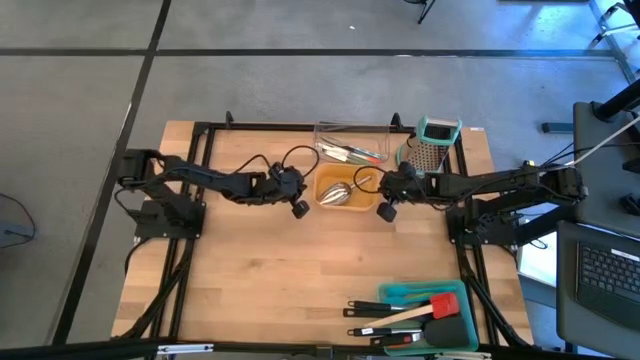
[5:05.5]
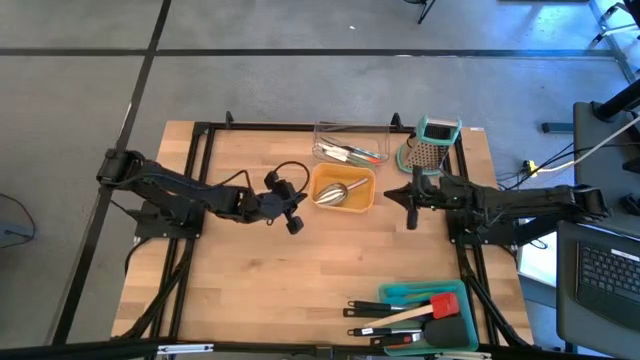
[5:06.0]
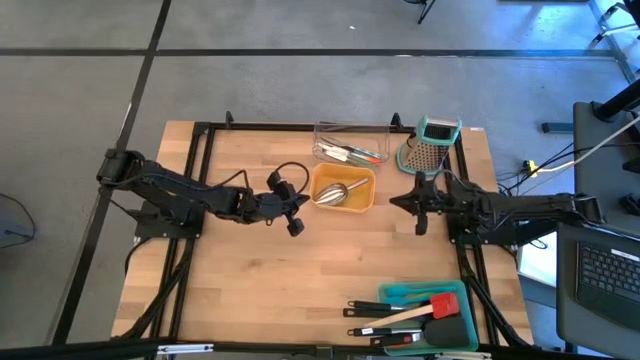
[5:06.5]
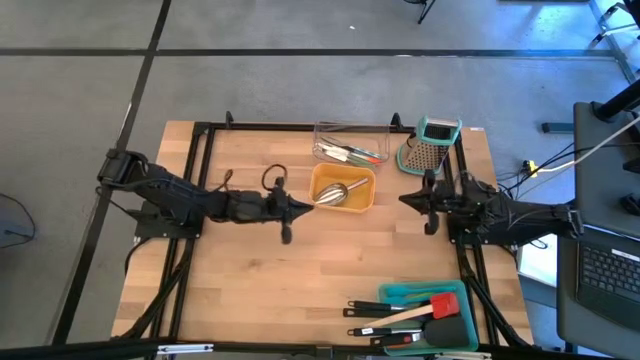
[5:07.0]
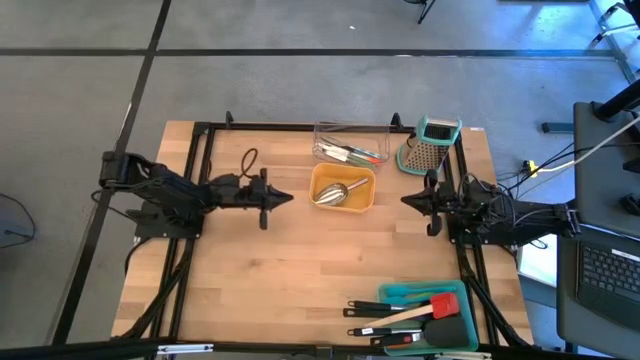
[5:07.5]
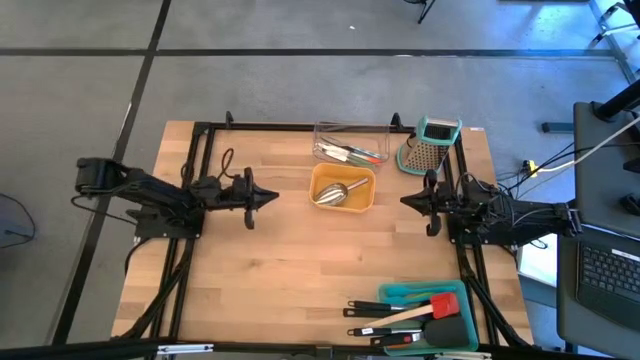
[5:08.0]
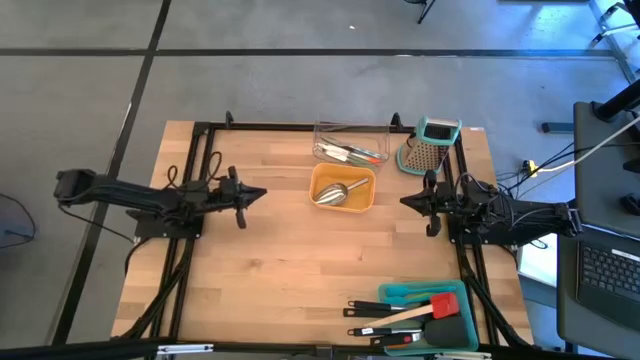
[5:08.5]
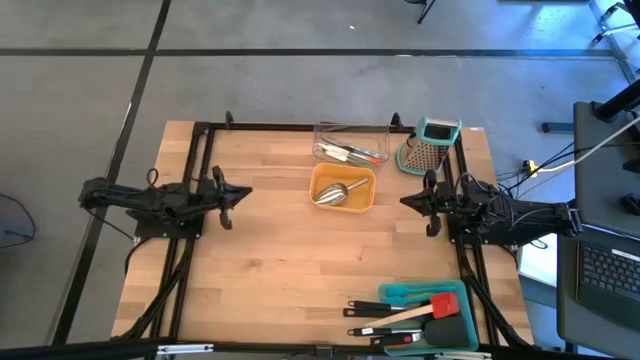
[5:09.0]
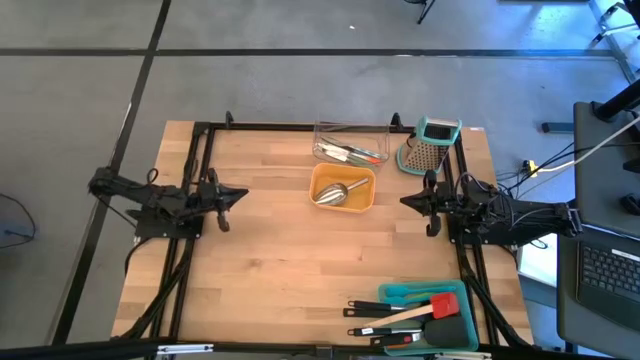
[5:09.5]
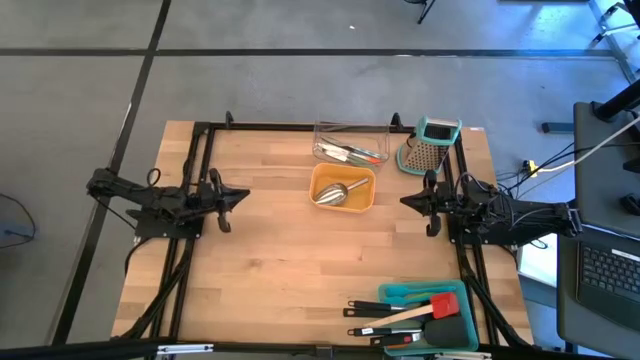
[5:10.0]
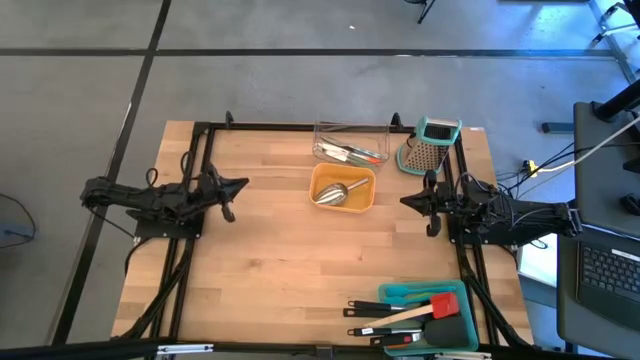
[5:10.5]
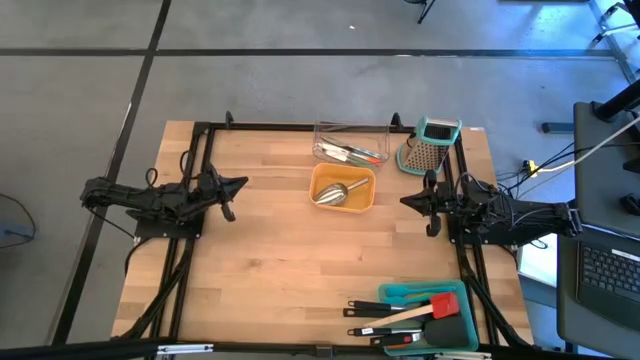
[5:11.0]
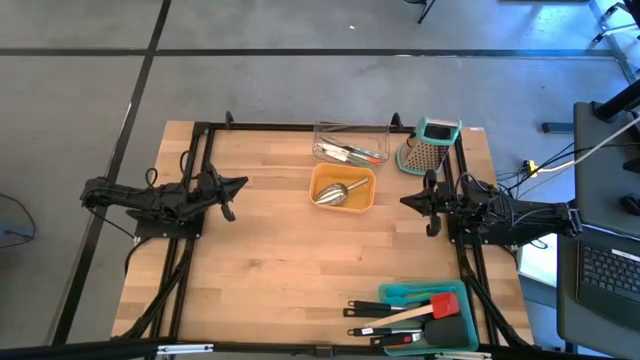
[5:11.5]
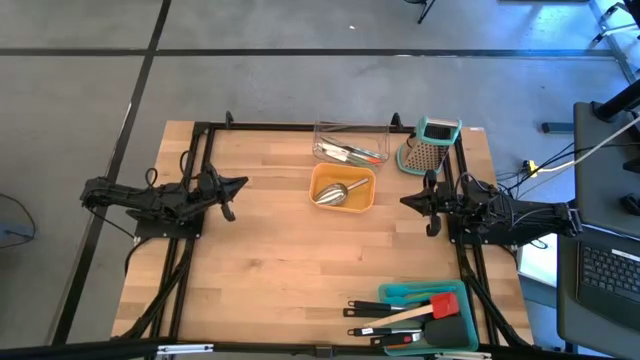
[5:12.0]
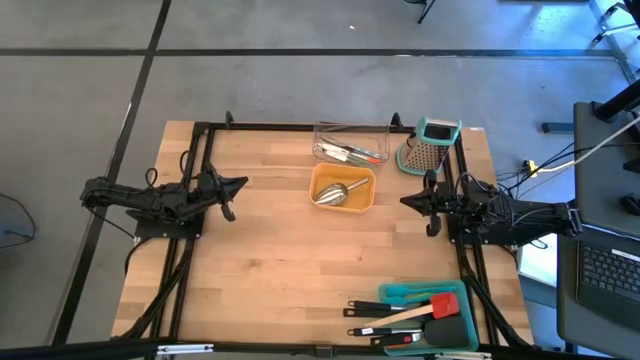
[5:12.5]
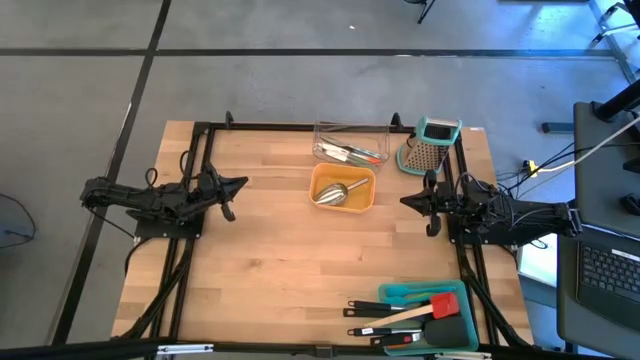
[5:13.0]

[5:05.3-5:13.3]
Task: Pick & Place Kitchen Items
Return to Home Position

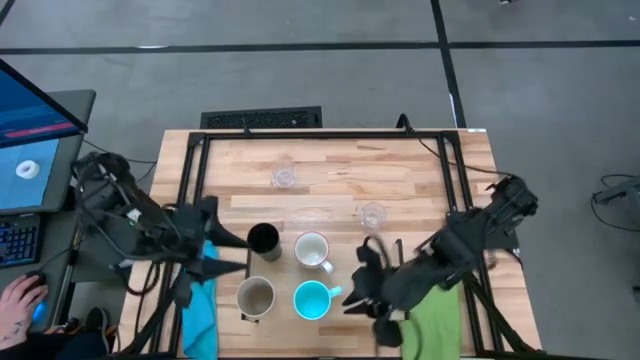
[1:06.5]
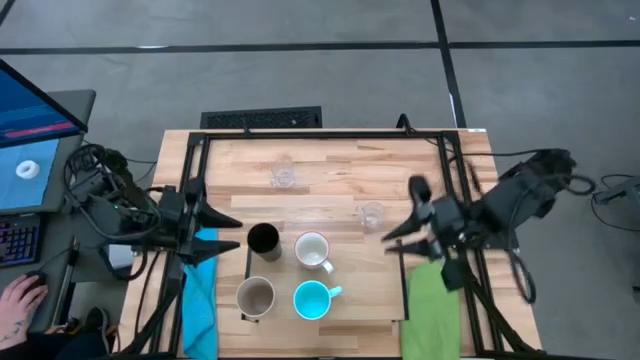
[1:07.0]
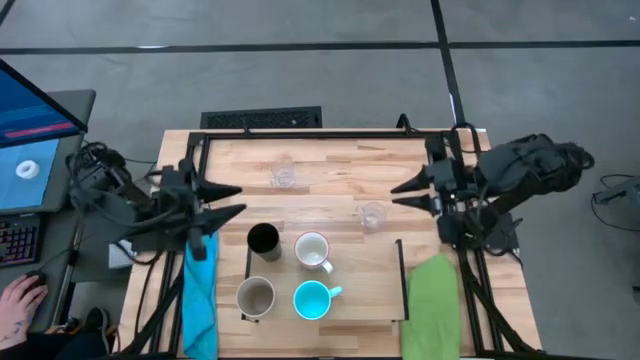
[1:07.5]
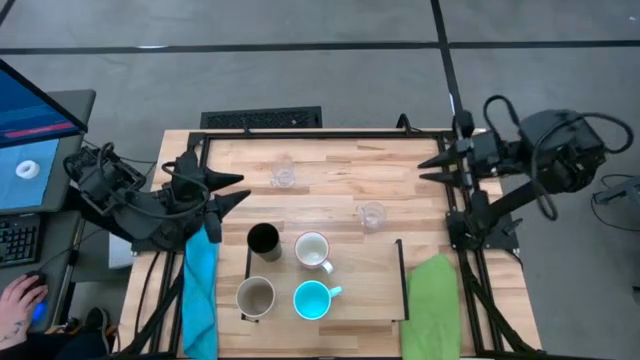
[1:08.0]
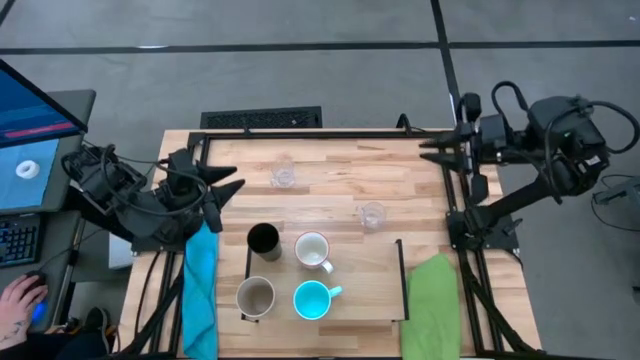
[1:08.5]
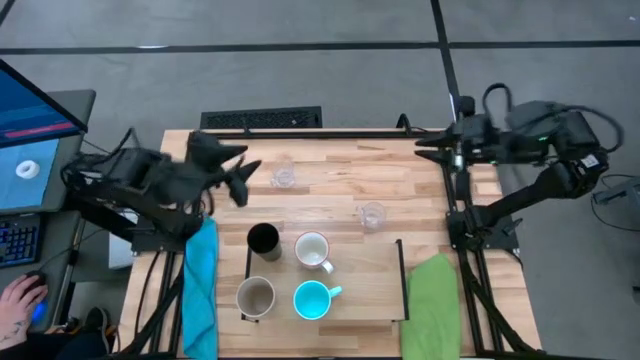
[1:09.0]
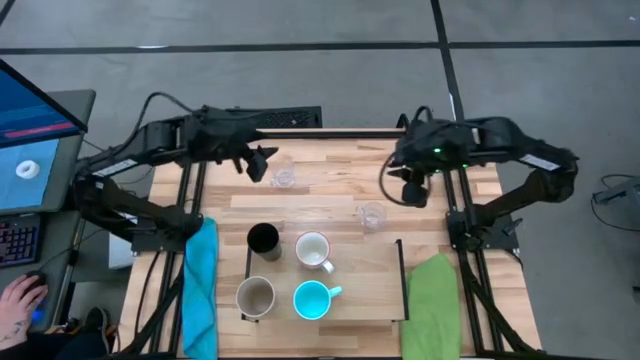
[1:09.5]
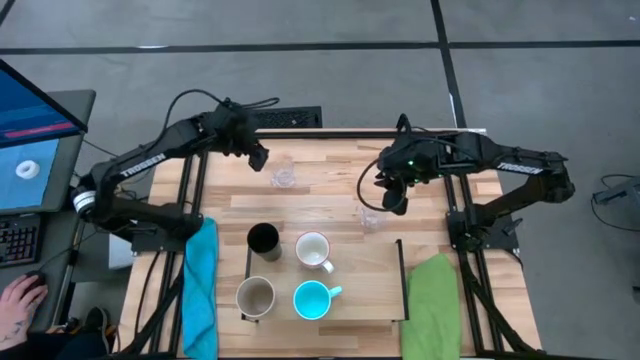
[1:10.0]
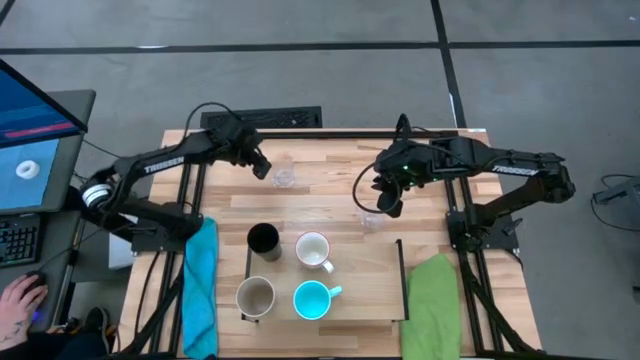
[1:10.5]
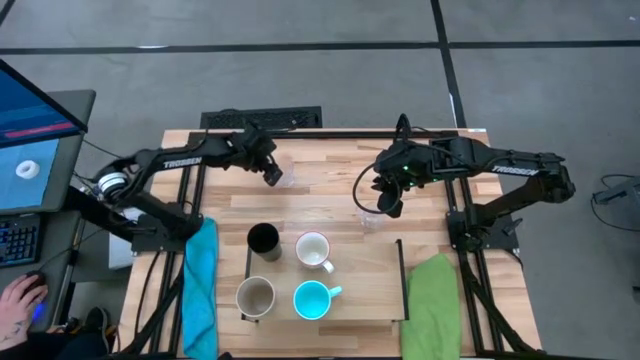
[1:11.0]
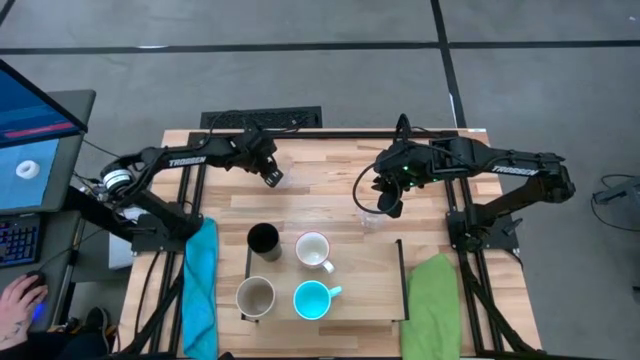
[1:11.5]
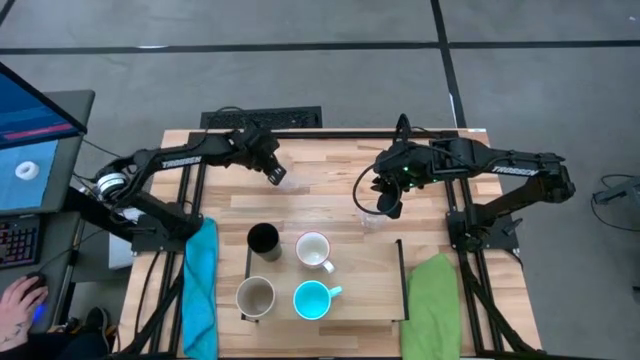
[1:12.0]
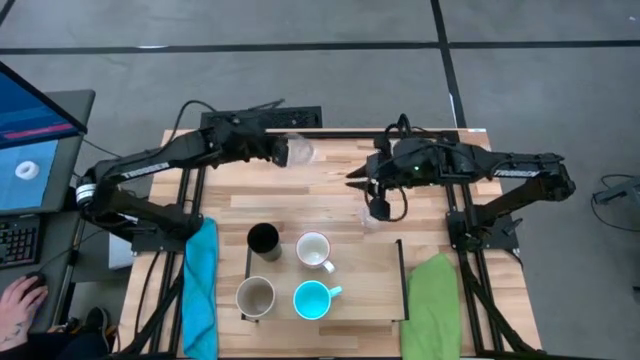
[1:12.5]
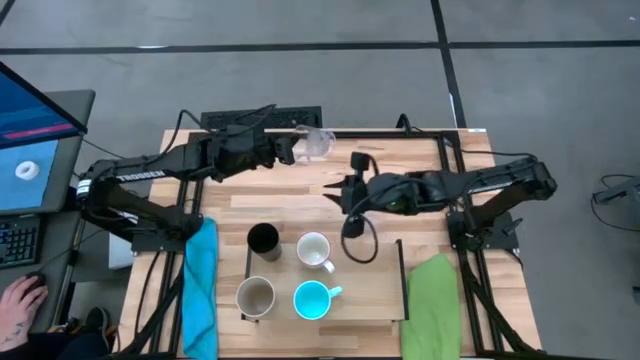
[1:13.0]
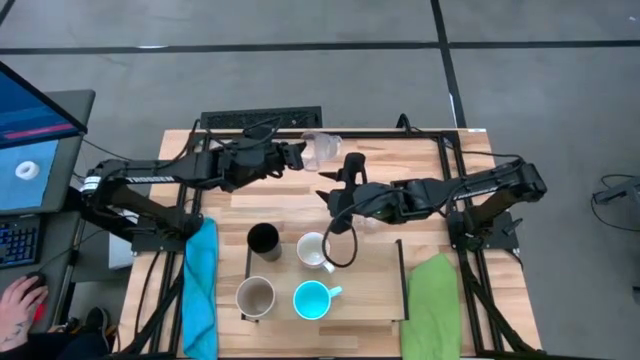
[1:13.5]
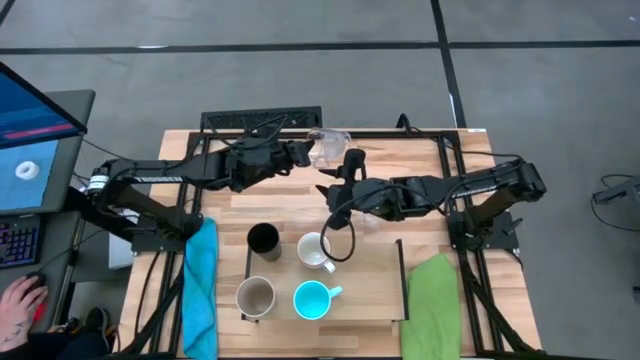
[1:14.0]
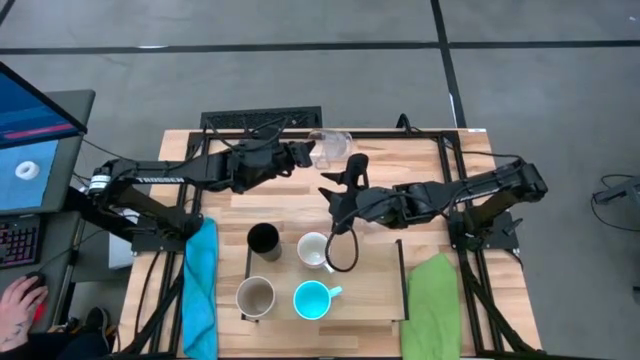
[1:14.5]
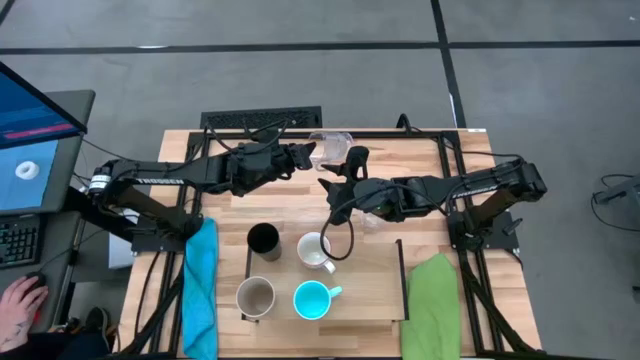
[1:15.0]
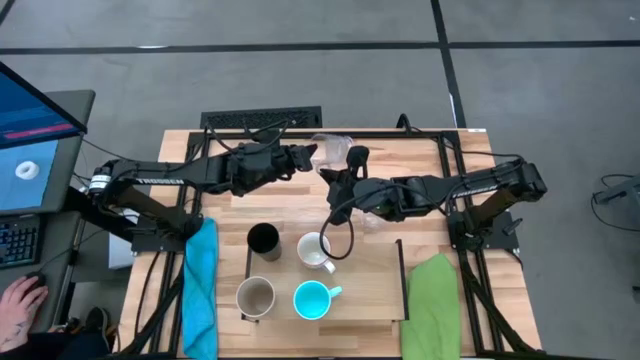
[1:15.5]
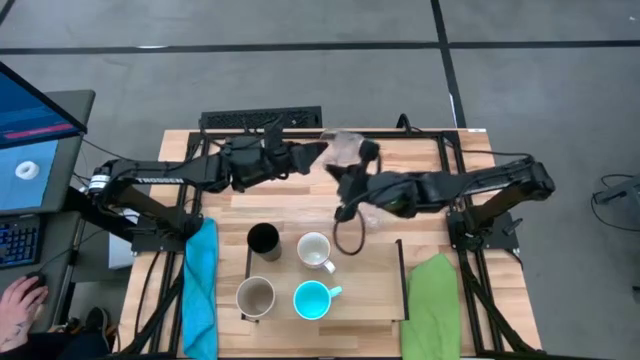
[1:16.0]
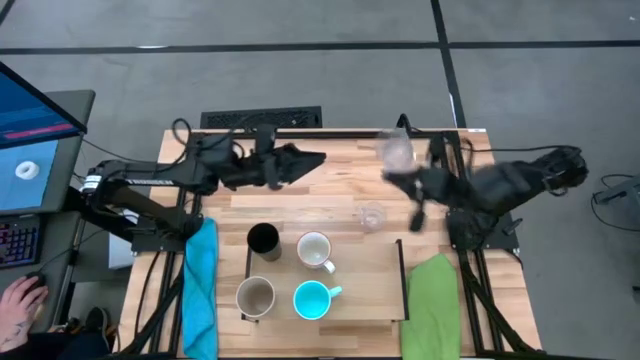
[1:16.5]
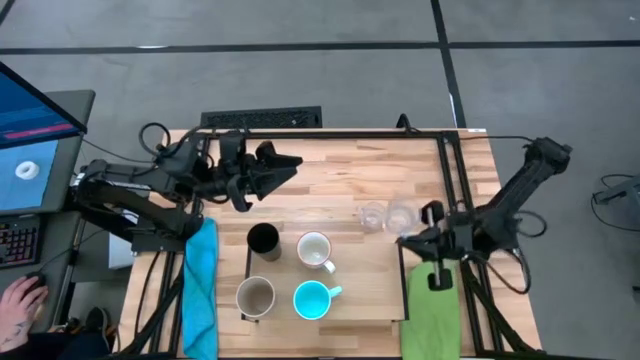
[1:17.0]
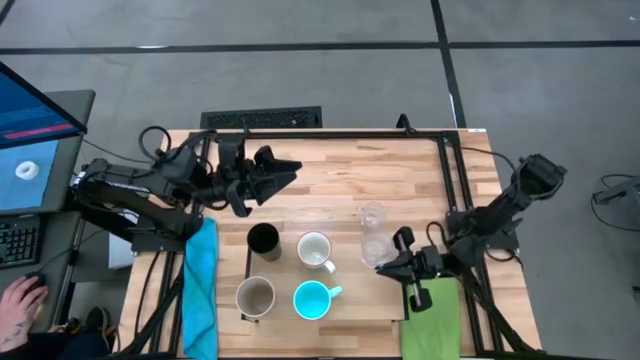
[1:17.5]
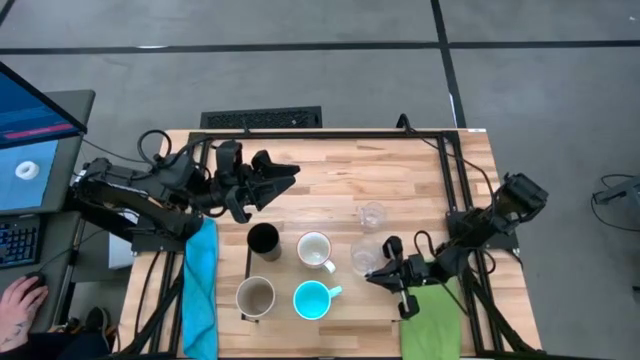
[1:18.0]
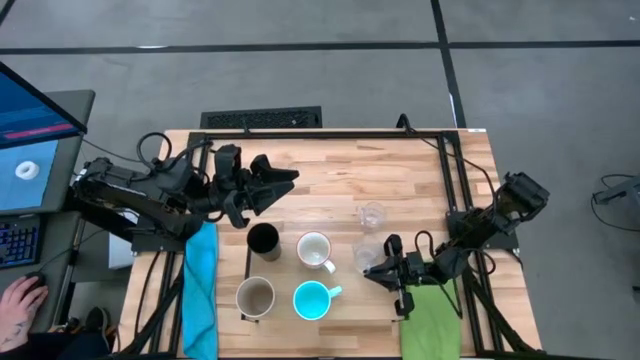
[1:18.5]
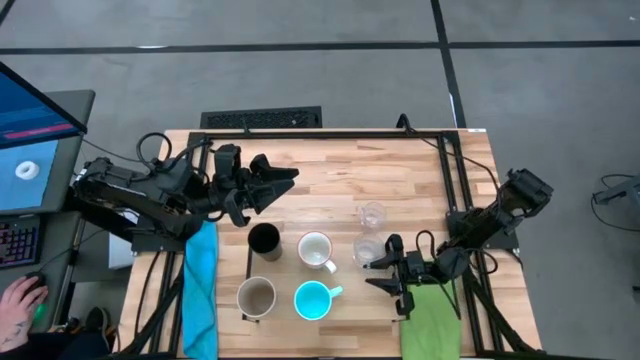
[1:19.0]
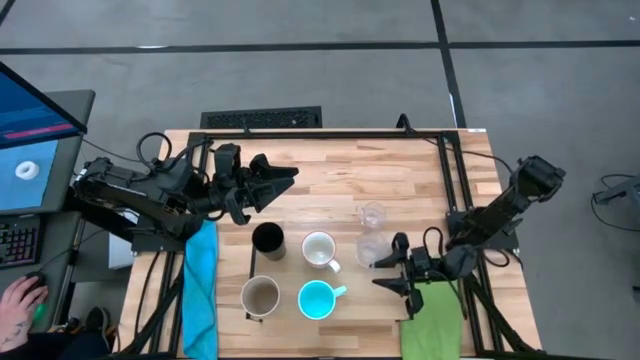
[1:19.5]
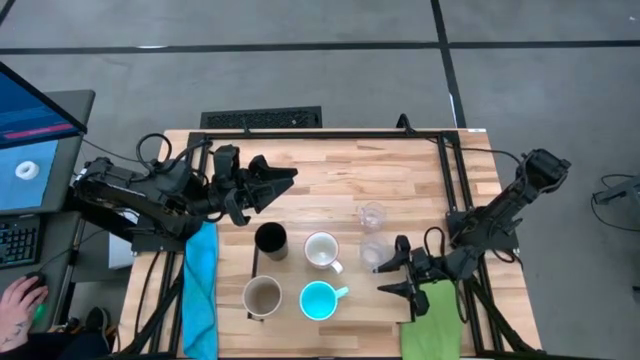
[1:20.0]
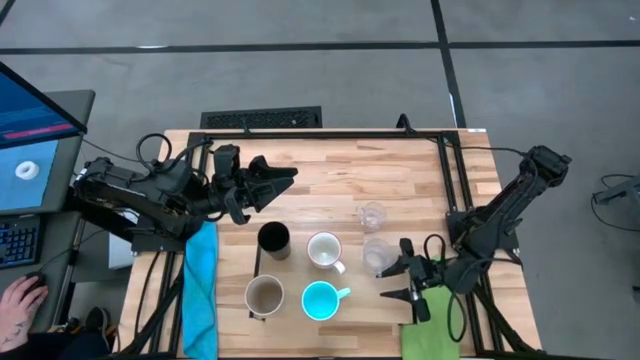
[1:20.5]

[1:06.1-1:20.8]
Task: Stack small to large cups/mugs on shelf
Put the left transparent mug on the shelf
